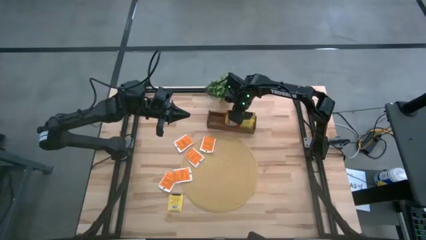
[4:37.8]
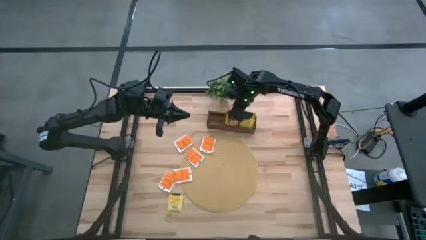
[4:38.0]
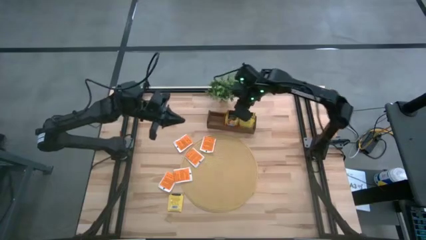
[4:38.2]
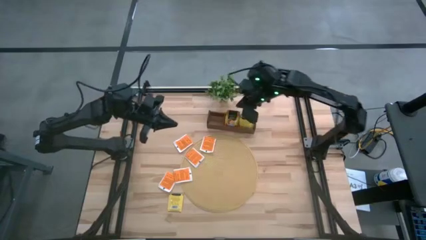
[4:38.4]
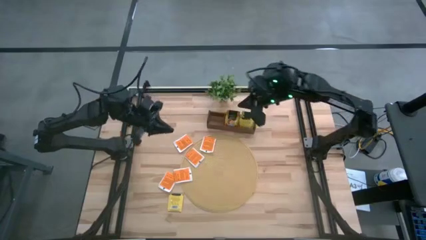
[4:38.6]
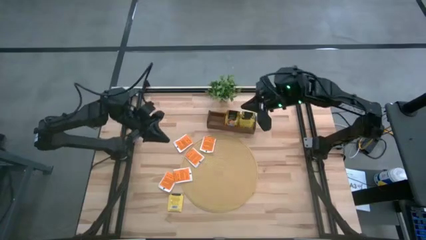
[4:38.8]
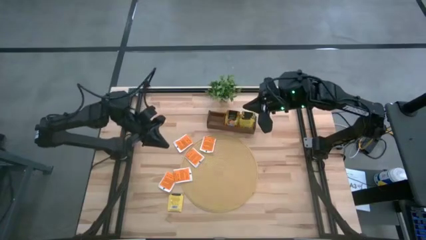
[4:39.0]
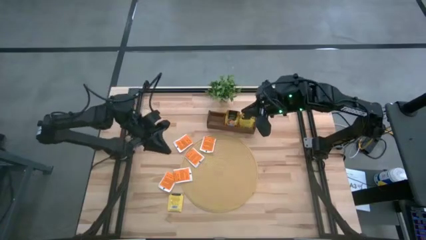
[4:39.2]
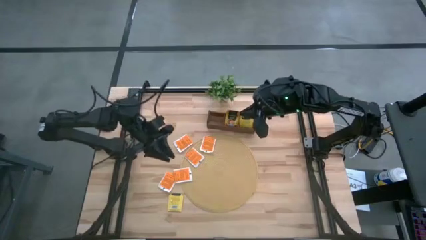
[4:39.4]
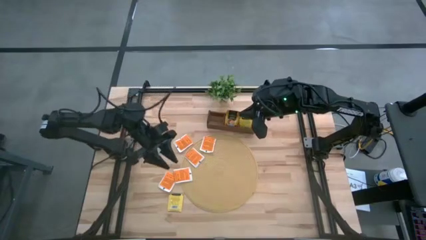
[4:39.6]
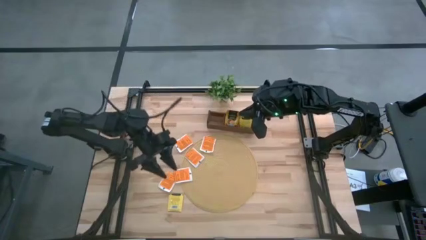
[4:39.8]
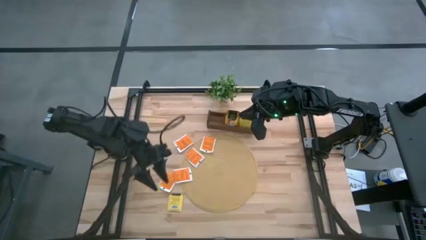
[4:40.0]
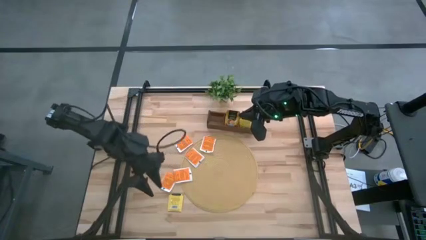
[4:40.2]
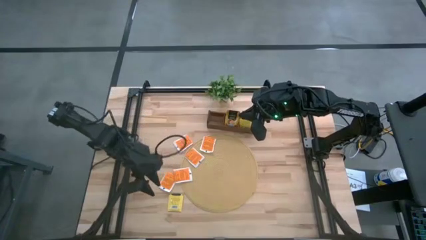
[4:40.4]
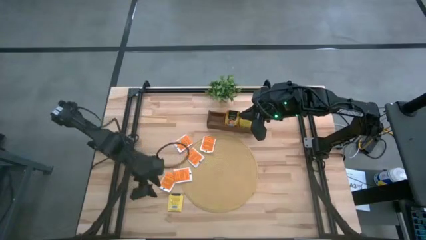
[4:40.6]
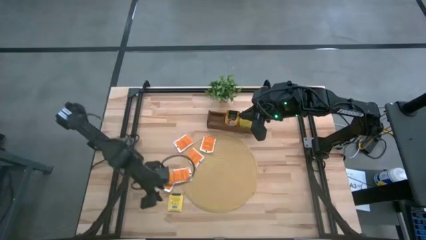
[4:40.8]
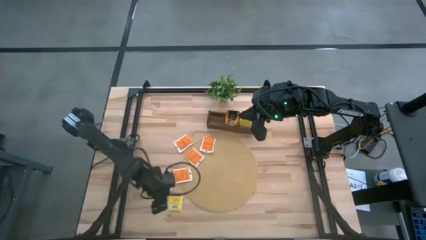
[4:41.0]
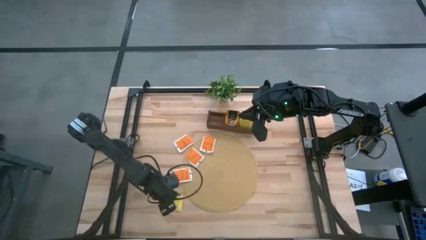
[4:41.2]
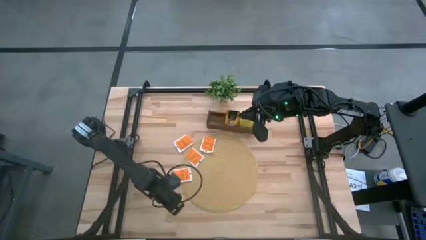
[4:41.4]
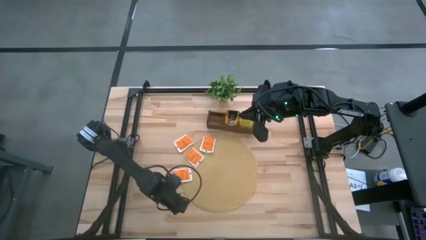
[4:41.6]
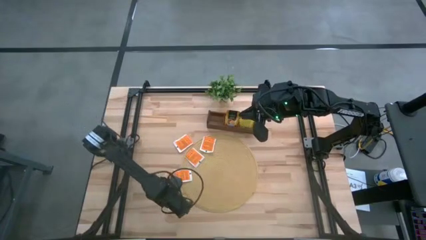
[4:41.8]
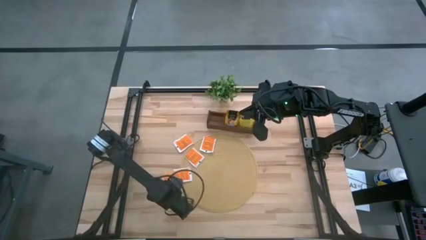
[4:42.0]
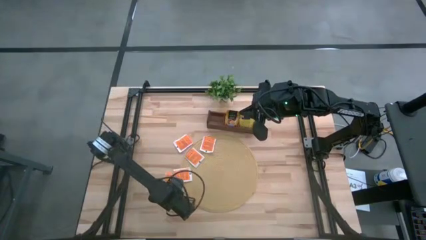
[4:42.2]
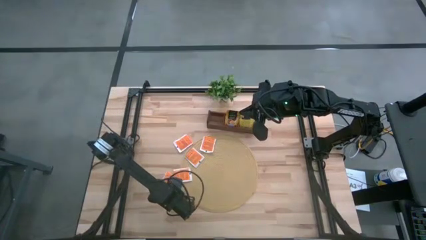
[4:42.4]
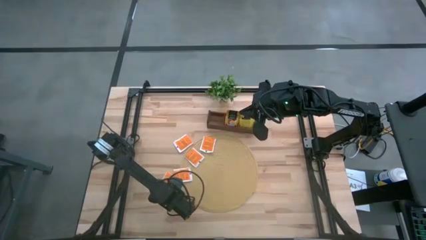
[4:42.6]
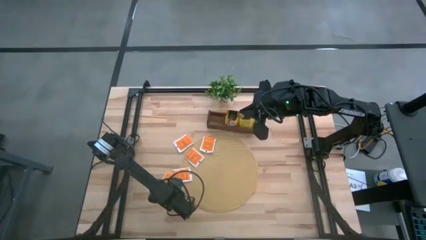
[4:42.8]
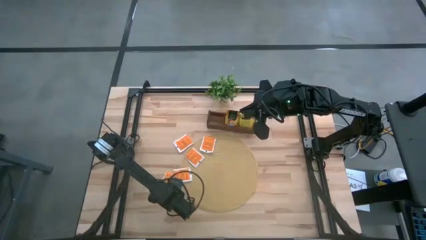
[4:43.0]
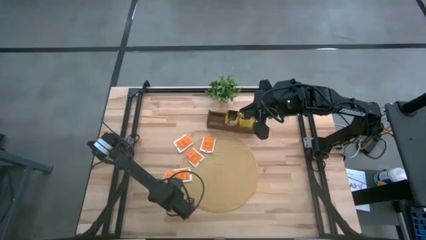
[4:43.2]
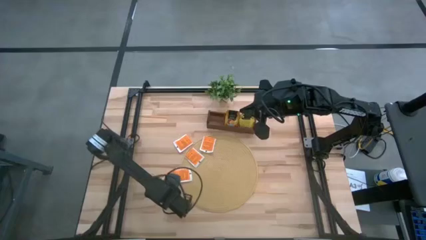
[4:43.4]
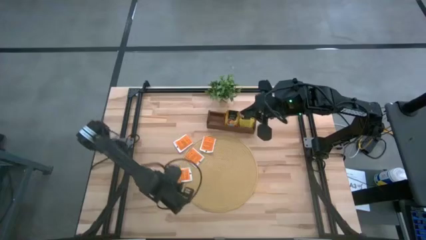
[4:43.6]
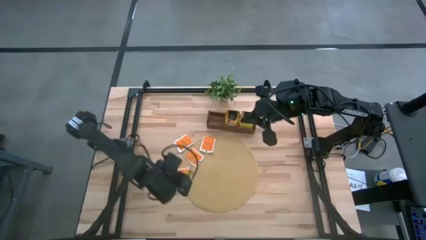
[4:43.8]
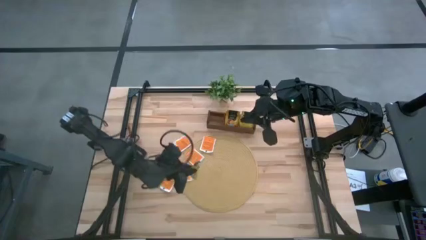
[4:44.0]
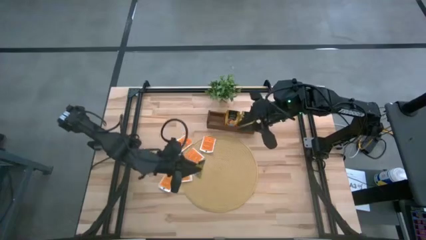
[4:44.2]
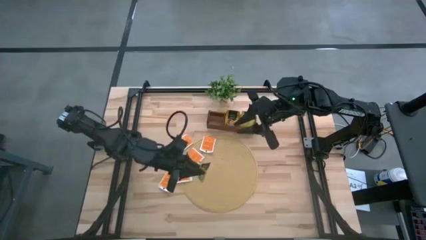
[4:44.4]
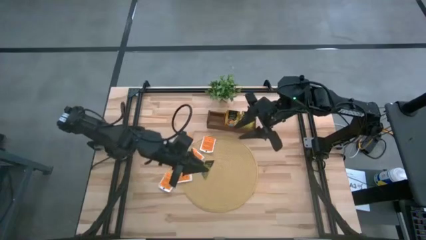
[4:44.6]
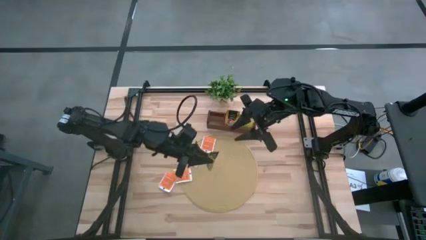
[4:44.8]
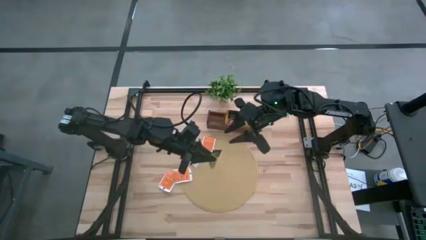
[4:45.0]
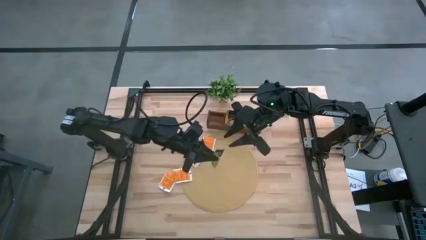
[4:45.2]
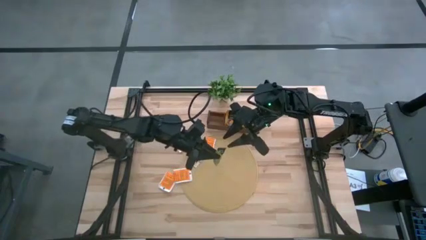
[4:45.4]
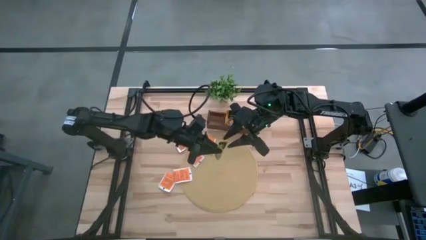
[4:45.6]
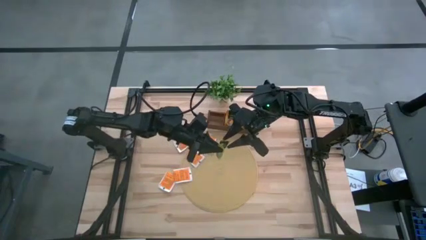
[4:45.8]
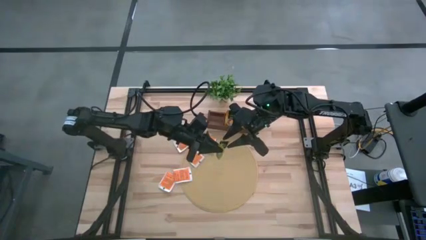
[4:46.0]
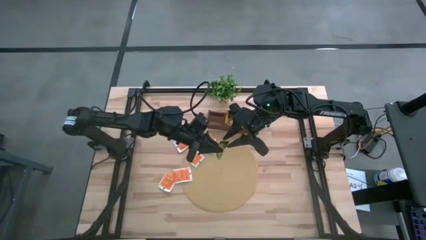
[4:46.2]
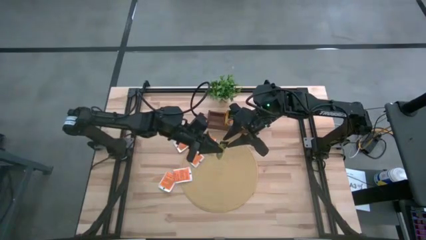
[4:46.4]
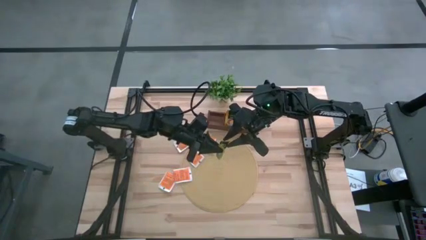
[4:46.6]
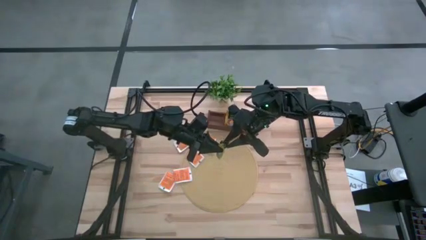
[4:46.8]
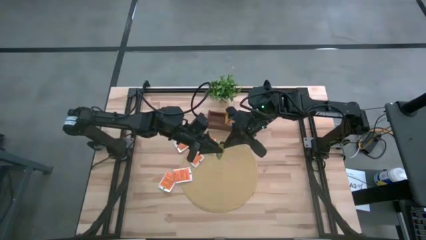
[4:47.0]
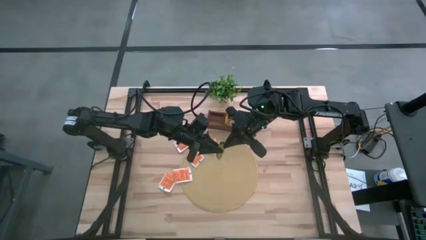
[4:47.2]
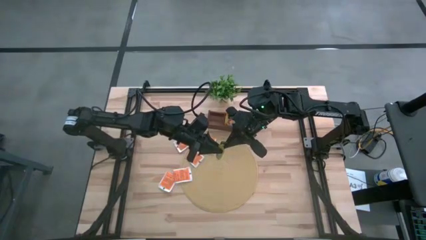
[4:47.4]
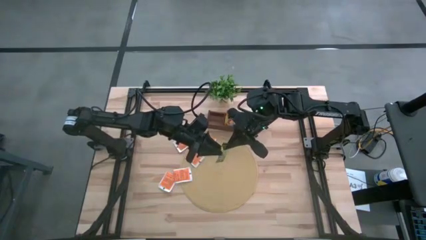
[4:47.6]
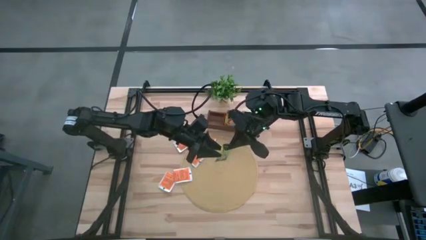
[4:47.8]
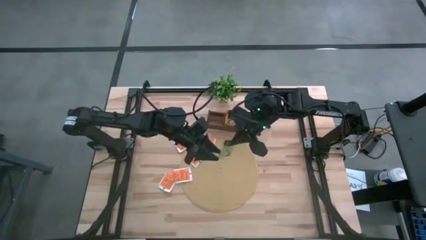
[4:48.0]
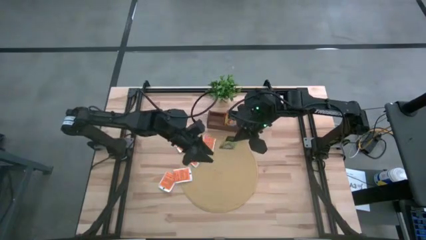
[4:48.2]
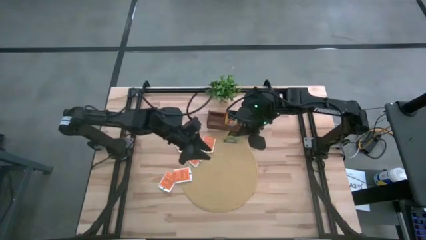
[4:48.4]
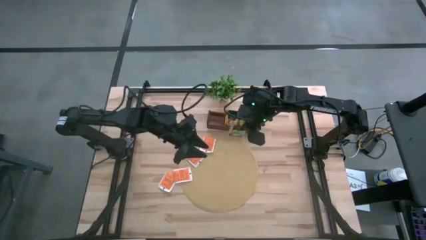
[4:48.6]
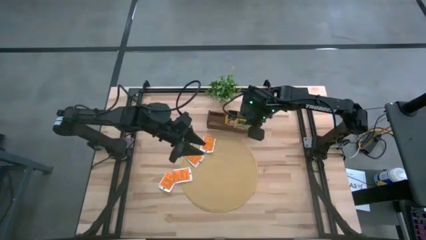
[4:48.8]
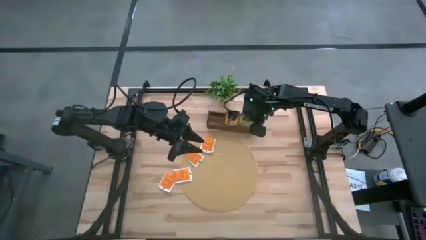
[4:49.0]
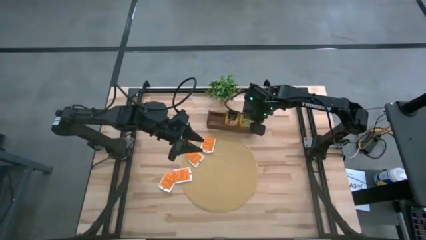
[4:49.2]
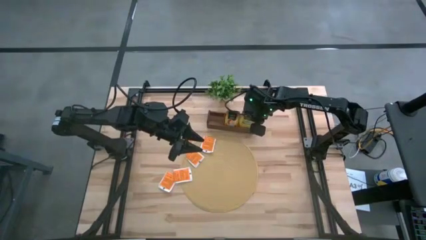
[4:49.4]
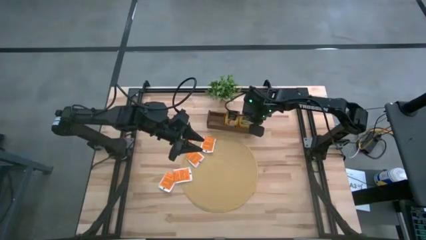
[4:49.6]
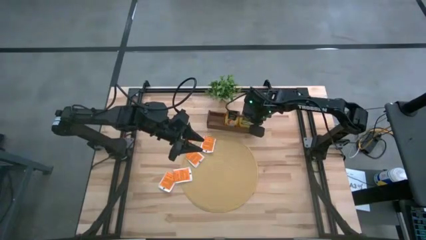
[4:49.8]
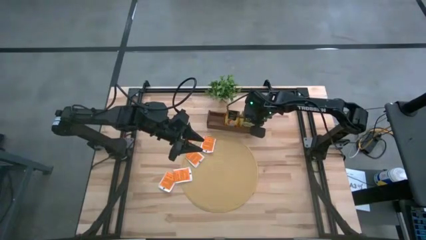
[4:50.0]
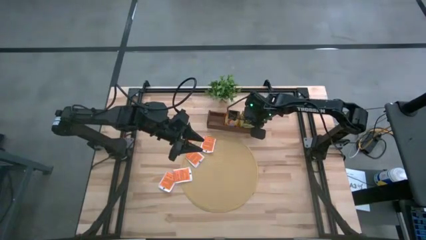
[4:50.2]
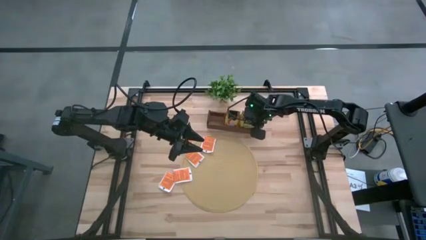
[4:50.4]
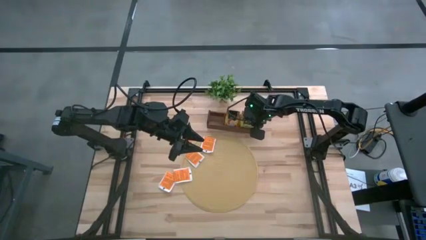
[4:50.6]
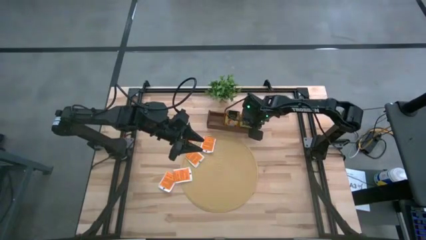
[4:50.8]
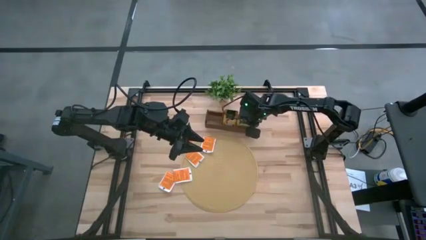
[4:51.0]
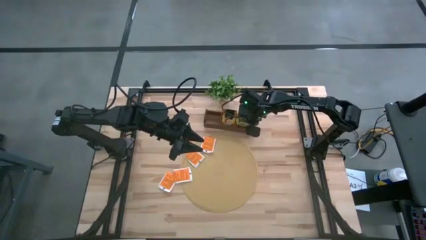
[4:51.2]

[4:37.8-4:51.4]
Task: Pick & Place Tea
Put the yellow tea bag into the right section of the wooden organizer

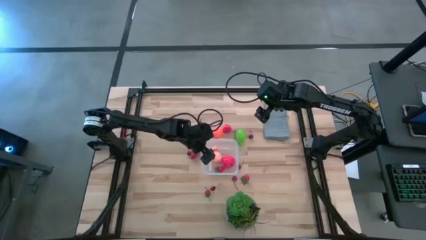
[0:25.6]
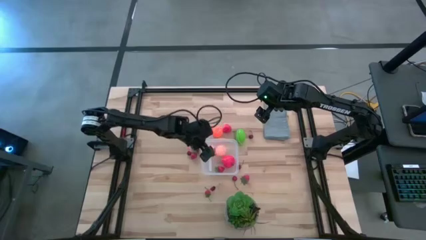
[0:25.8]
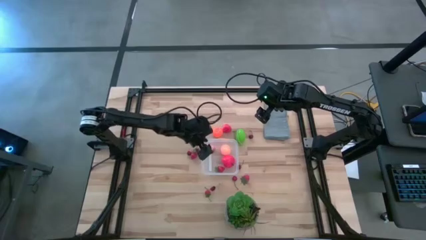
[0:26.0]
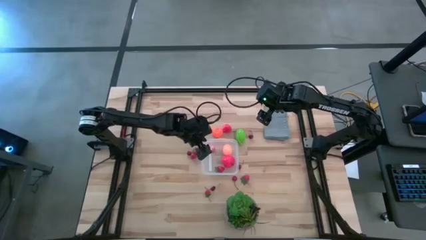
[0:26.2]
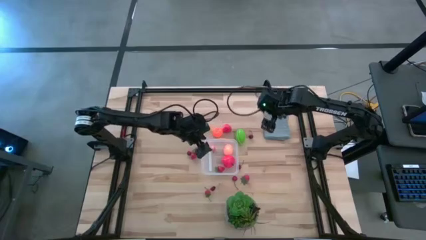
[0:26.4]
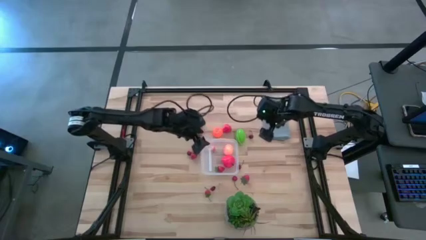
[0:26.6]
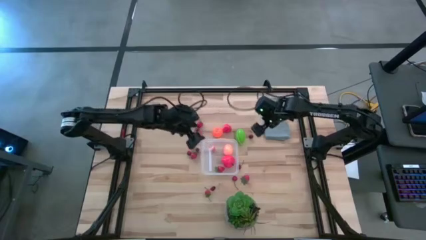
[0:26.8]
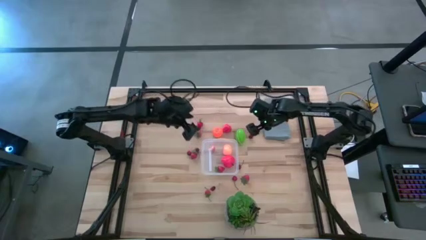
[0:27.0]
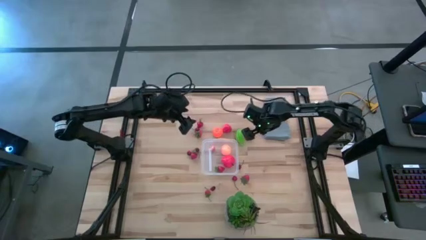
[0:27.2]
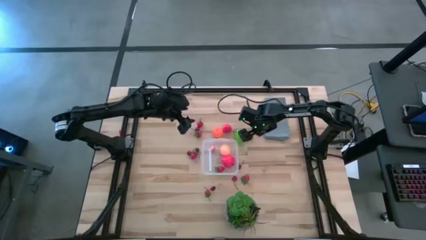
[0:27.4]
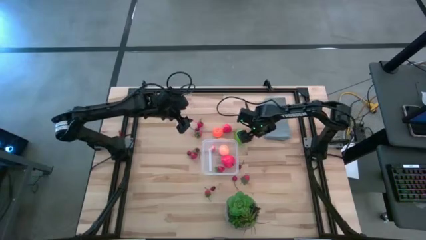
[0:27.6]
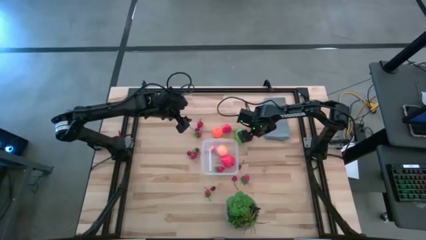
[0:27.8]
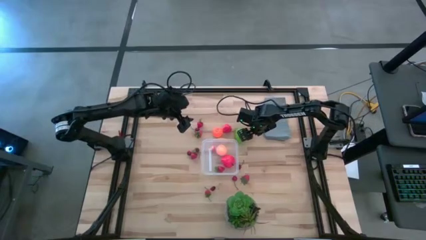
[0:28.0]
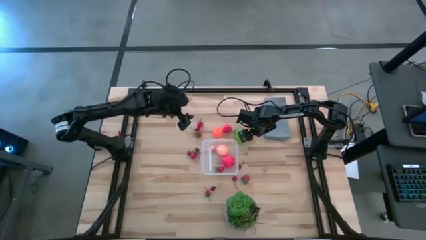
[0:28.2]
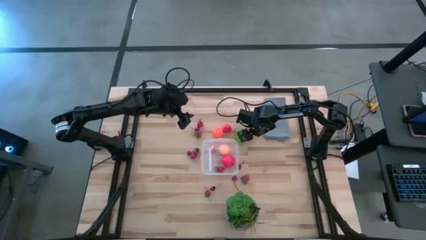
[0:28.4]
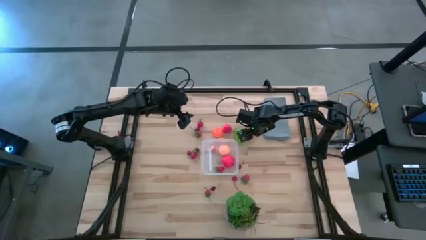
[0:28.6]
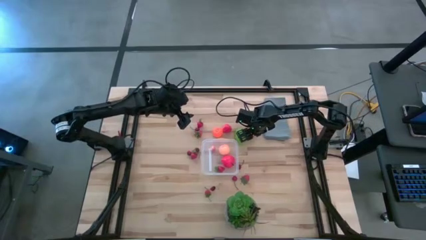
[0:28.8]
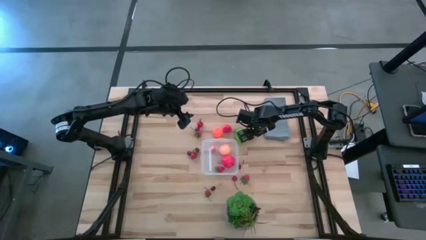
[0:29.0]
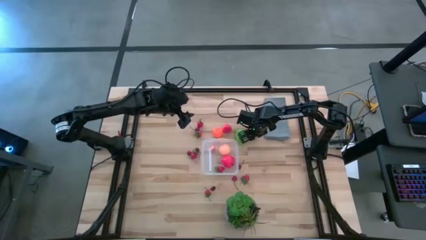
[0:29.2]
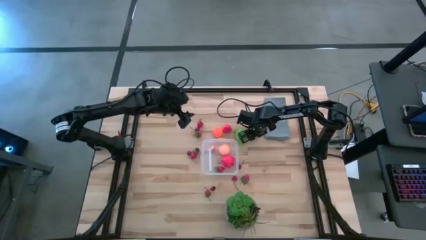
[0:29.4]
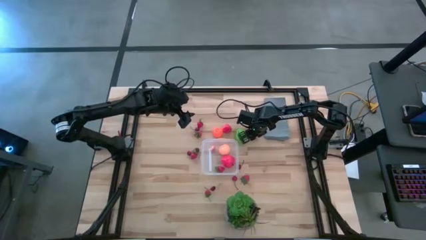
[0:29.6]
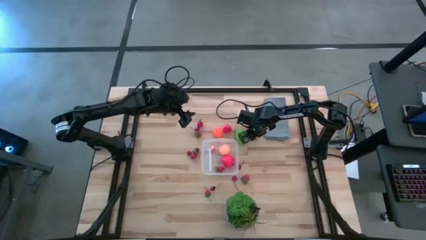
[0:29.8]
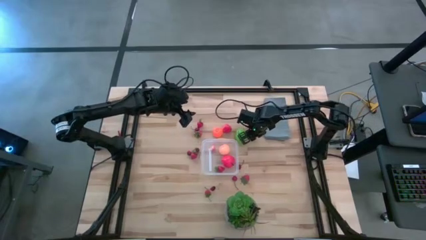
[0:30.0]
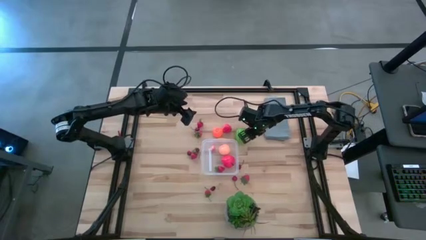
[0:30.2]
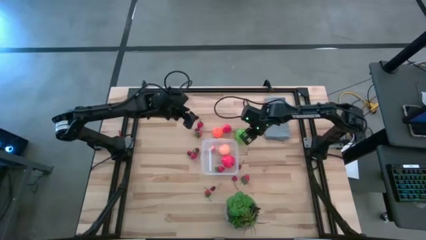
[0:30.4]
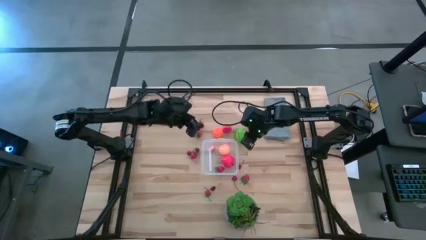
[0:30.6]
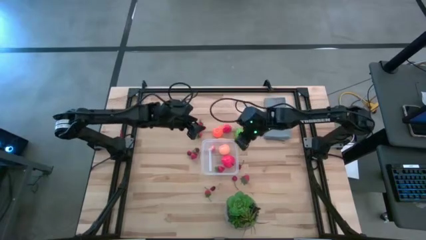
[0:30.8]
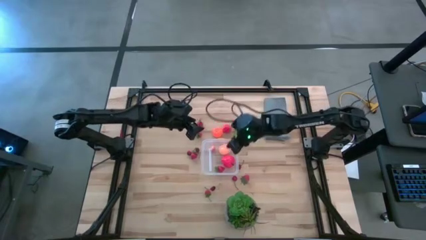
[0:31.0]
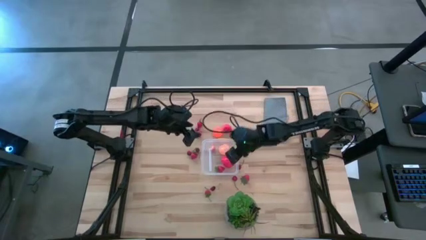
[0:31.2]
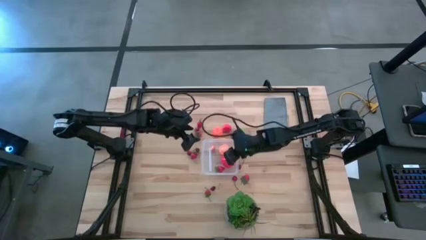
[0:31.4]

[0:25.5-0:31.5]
Task: Pick and placing Produce into tupperware
Put the red cherry into the transparent container
